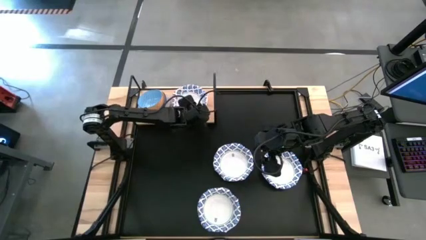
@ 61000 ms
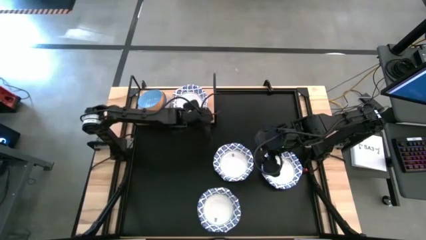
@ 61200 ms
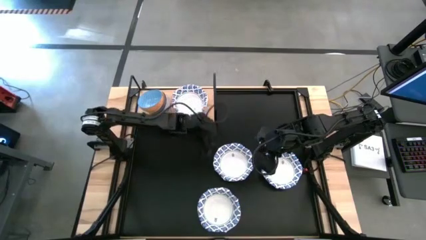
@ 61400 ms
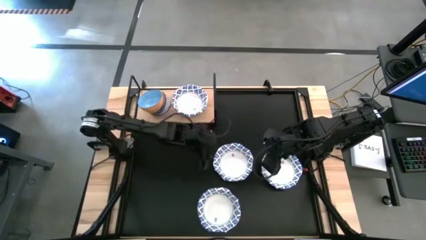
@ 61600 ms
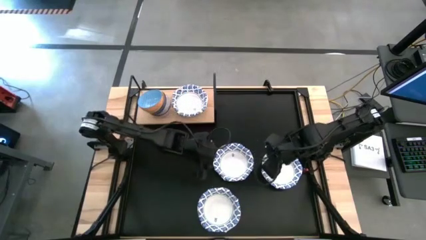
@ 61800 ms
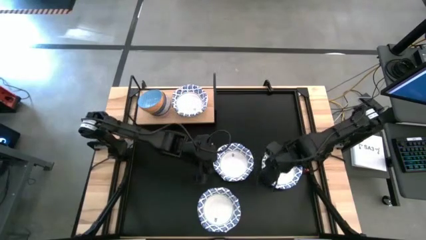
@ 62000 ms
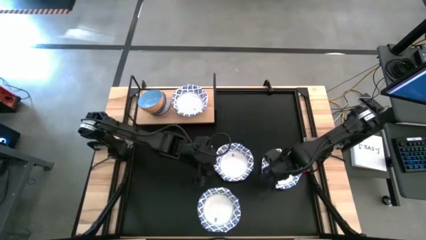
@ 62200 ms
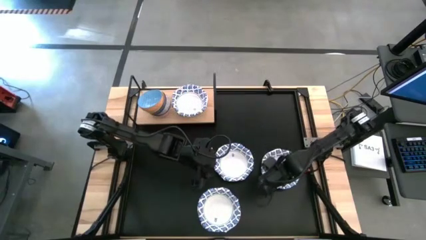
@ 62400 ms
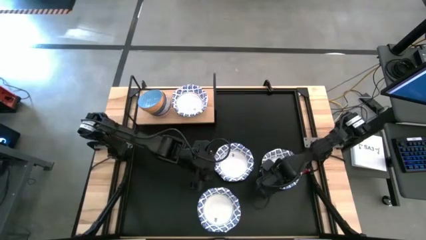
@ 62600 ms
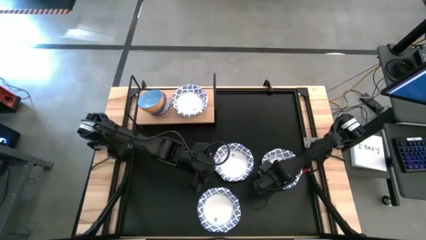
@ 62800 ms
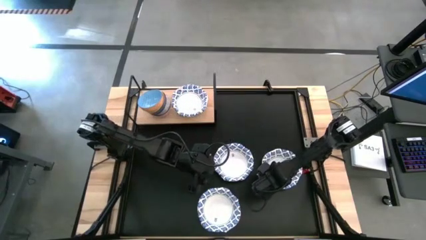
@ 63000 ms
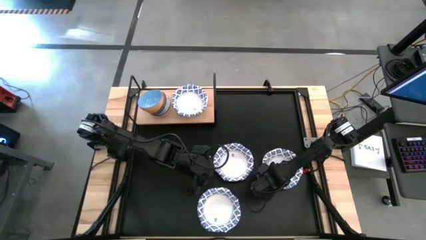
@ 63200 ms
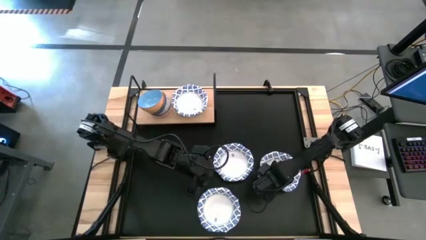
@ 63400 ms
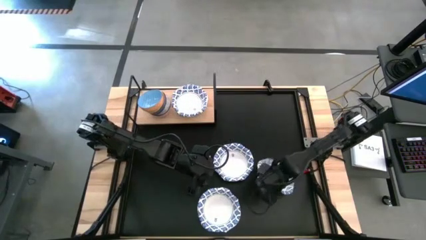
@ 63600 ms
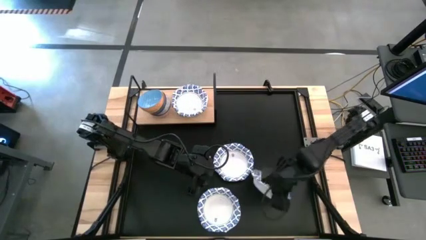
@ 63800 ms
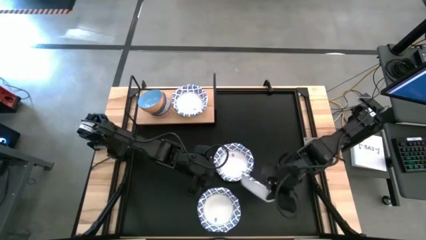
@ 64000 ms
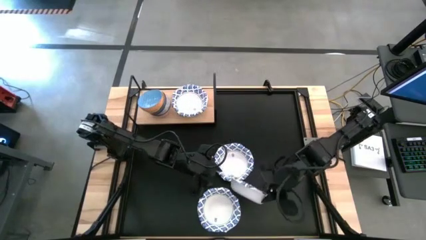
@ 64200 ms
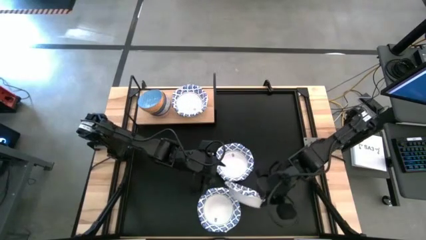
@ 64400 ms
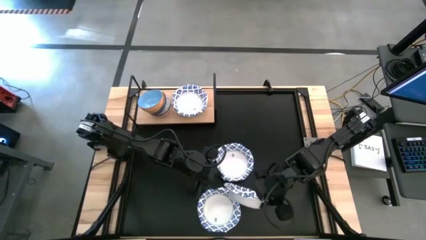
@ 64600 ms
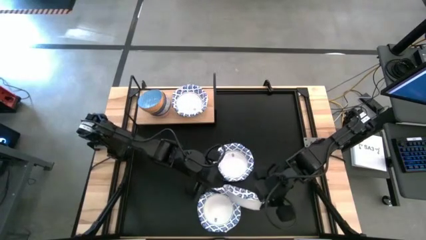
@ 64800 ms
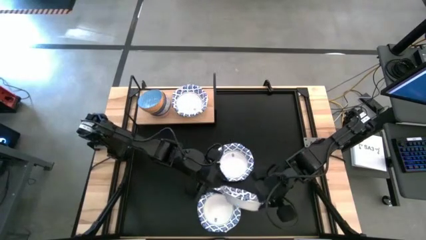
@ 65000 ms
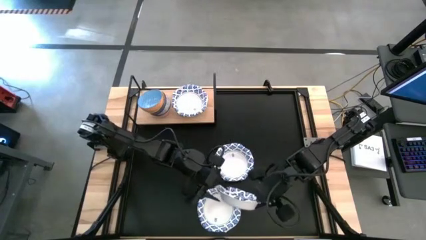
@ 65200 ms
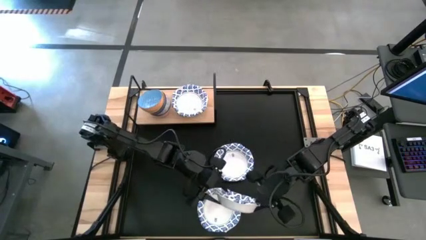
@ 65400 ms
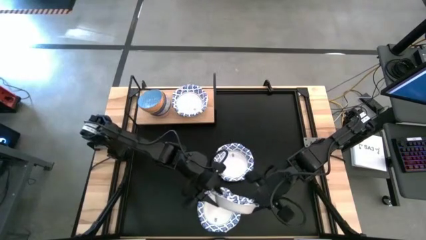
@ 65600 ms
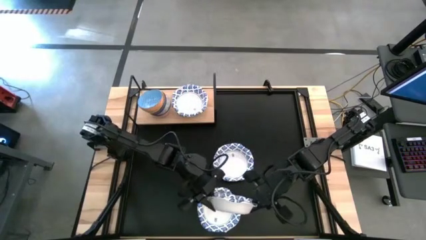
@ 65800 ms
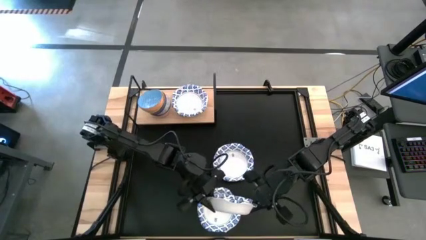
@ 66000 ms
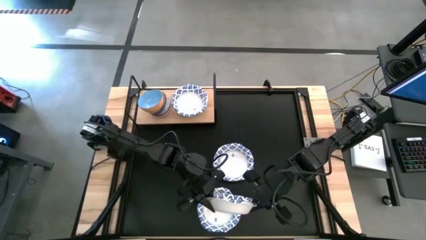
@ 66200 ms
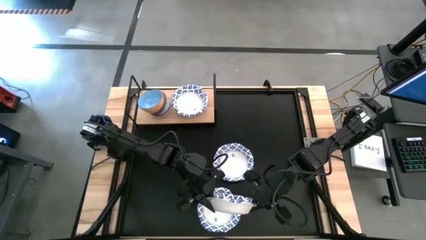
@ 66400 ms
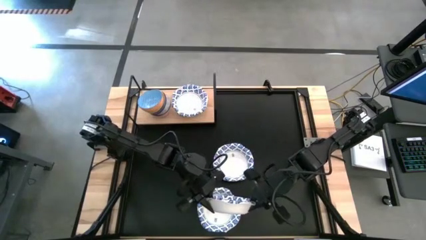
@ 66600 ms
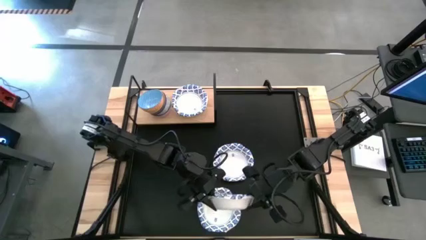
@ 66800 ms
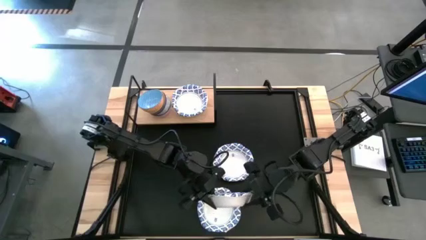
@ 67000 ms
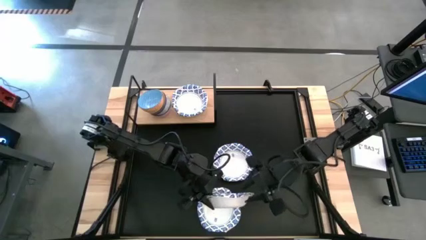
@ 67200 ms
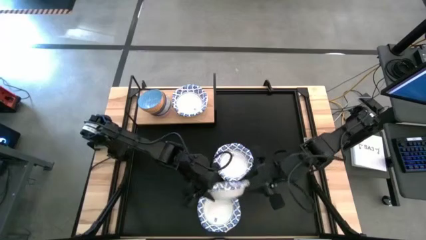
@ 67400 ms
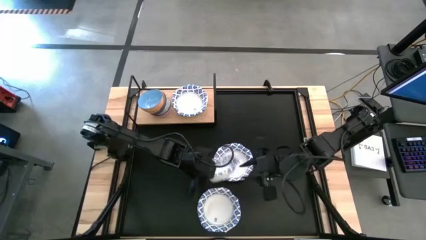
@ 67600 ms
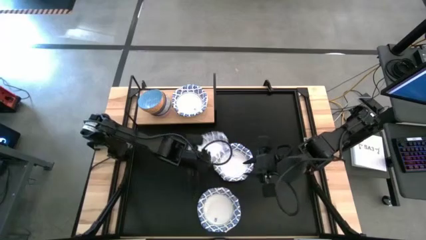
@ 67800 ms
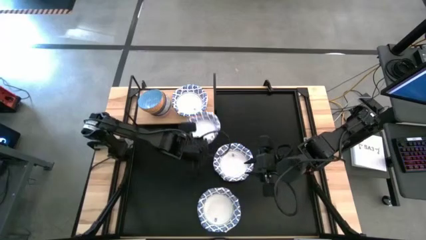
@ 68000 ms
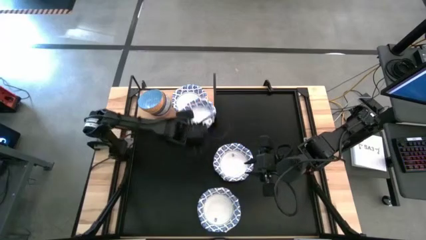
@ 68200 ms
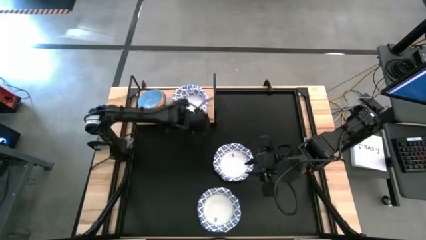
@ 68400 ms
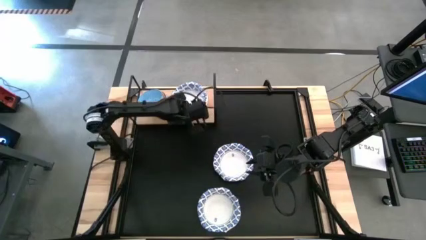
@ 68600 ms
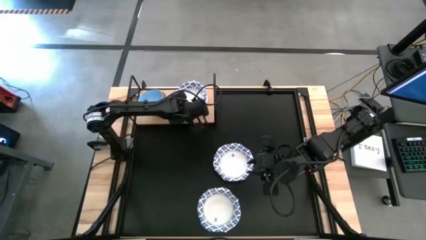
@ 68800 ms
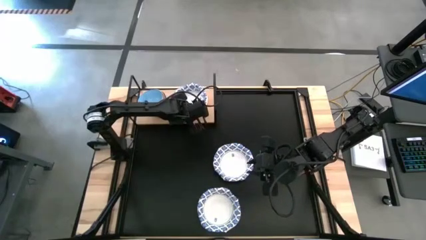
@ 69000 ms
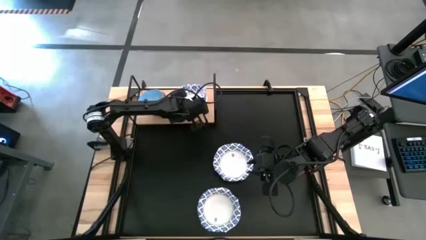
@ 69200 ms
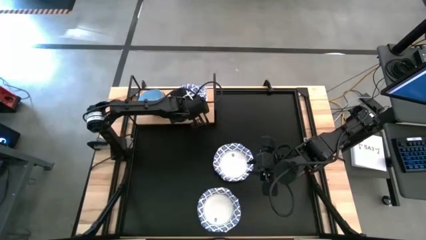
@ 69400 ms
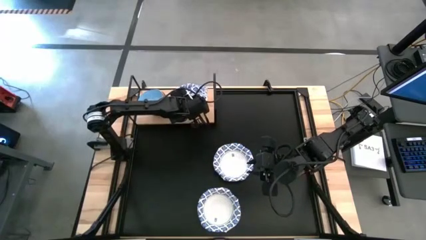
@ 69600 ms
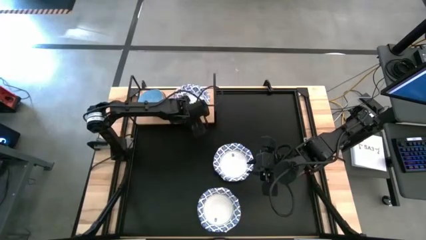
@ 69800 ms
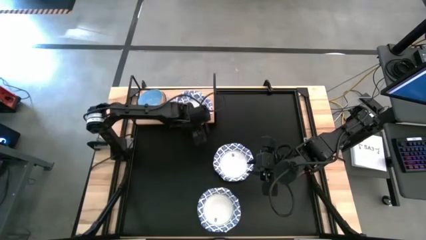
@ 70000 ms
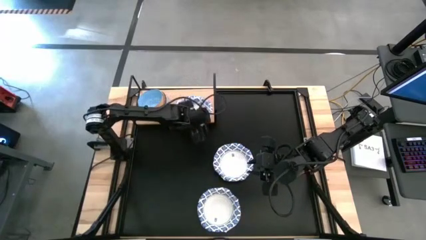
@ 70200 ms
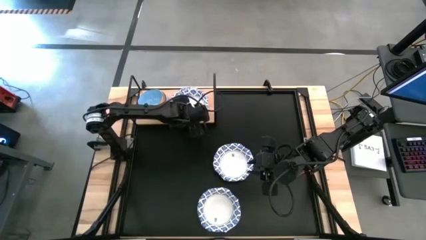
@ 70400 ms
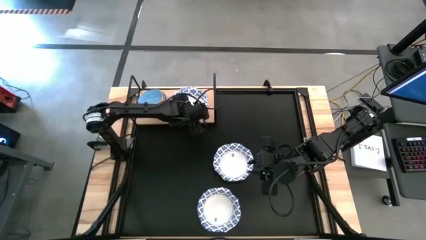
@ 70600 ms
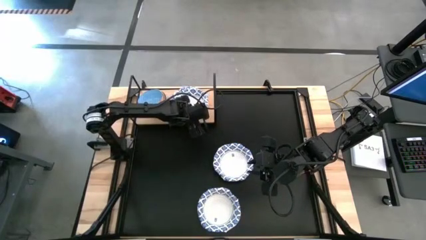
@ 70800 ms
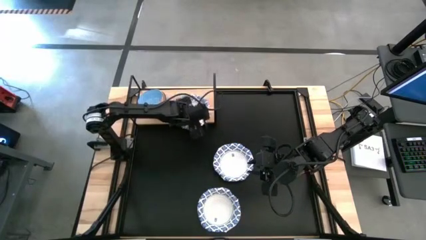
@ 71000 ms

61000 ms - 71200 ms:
Task: Place and stack bowls onto a shelf
Stack the top right white bowl on top of the other white bowl on the shelf

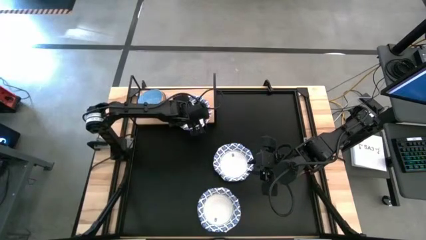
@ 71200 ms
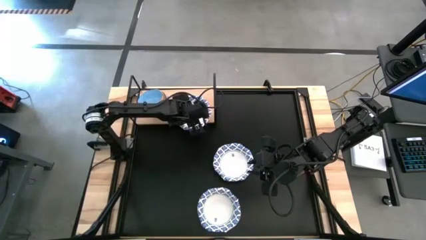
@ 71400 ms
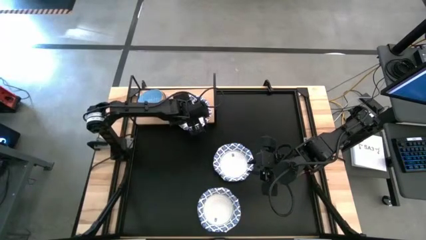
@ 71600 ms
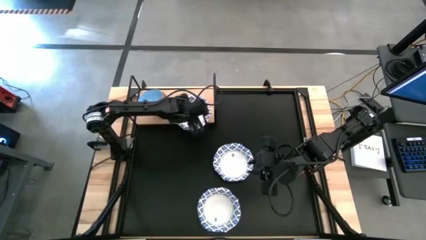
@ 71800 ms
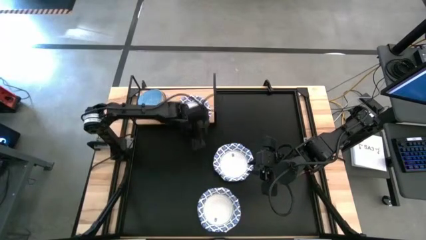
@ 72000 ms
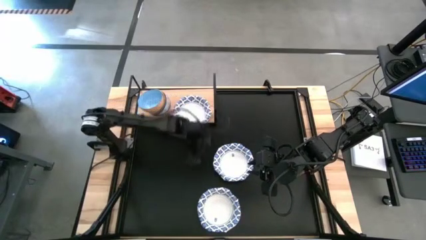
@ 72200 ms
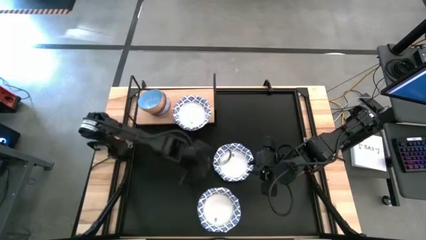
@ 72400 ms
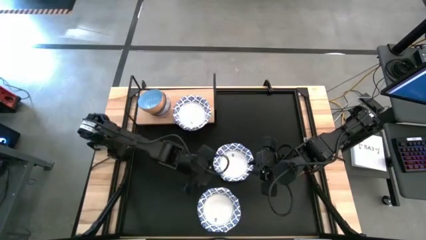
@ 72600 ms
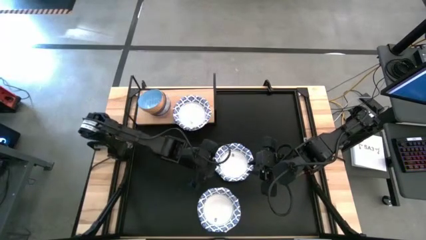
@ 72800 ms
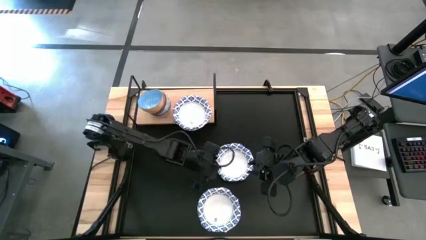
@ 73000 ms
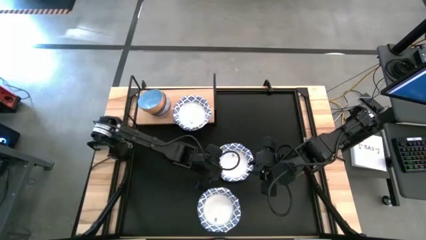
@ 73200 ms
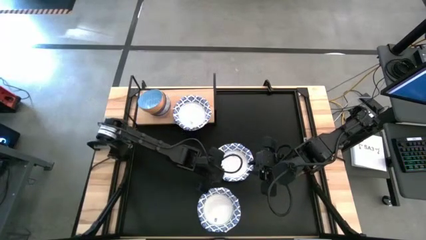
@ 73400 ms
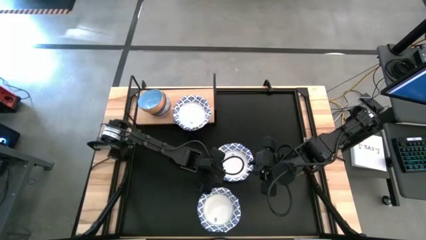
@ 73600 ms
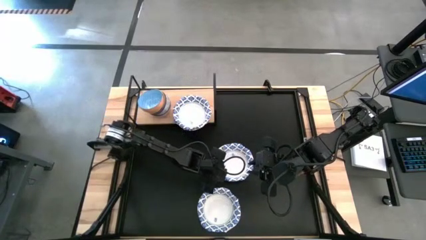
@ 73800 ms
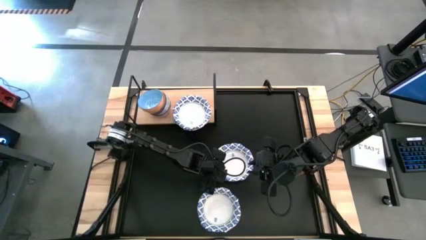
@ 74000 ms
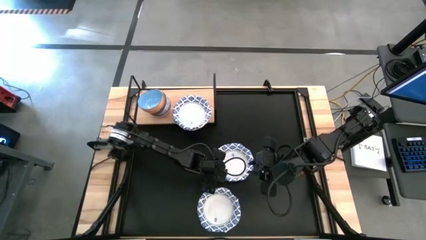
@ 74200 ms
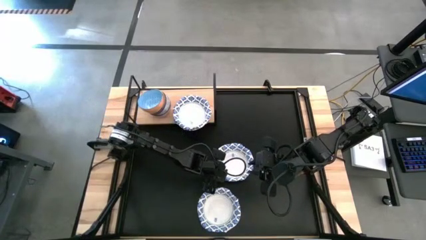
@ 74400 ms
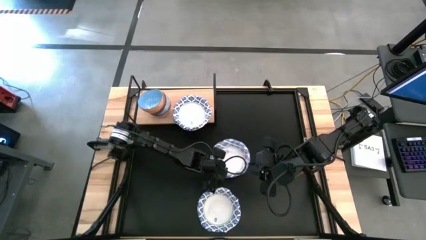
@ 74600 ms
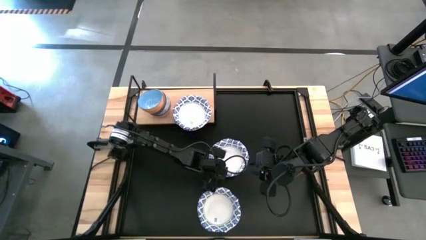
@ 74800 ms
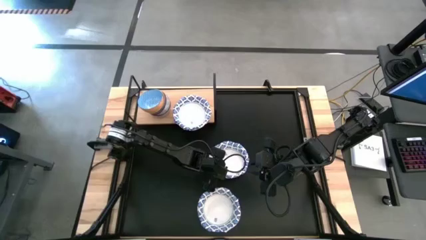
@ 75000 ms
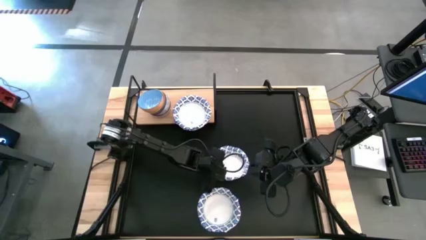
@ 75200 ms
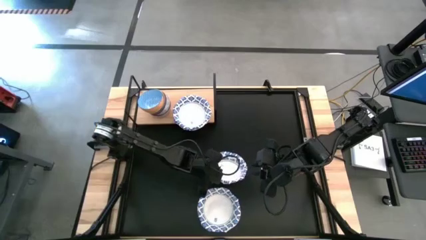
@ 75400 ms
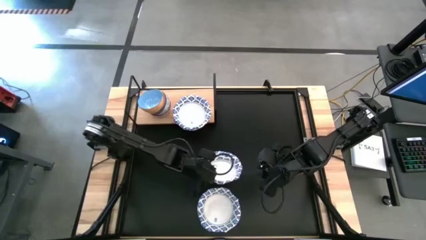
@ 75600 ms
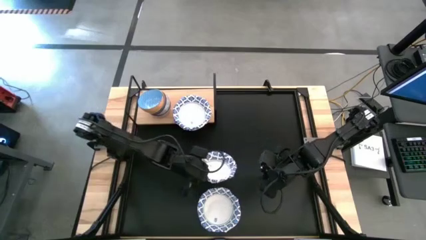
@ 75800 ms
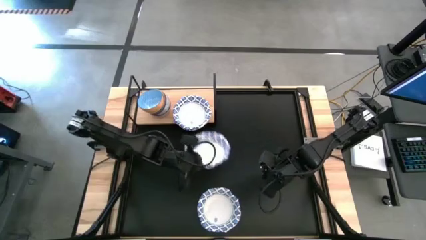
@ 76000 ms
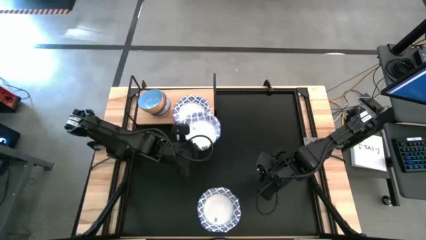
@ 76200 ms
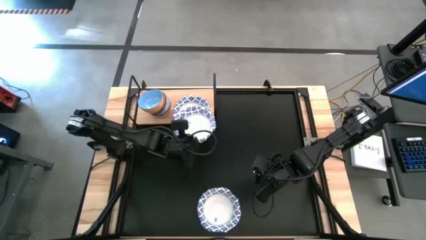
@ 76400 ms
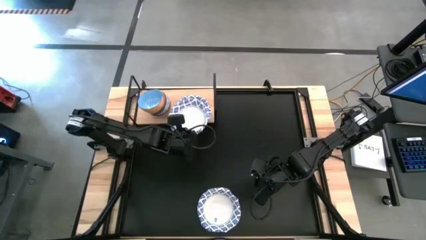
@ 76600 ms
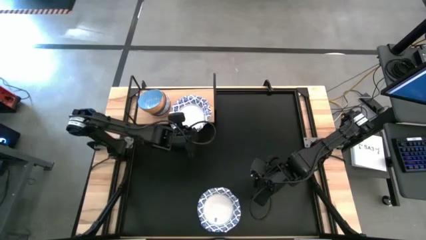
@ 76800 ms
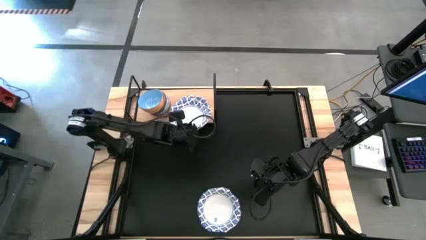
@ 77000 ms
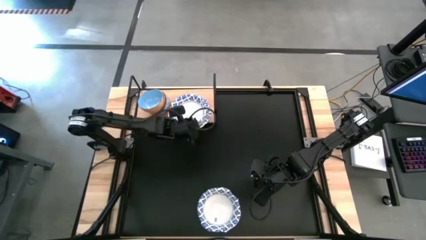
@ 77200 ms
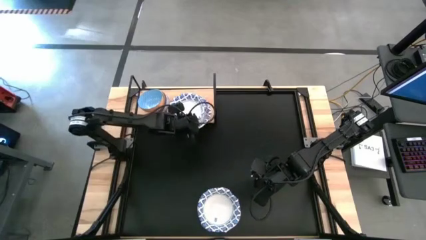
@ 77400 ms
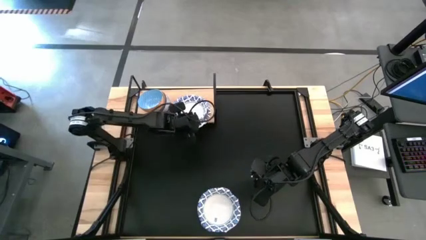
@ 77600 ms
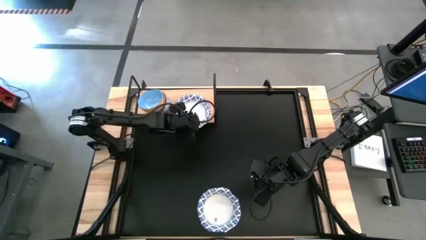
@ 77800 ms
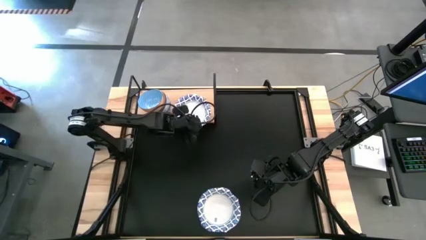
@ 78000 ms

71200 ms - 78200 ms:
Stack the top white bowl on top of the other white bowl on the shelf

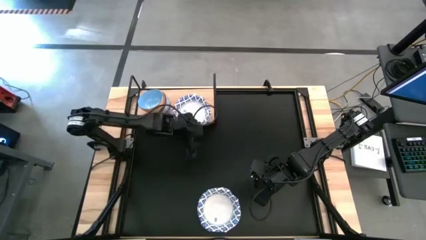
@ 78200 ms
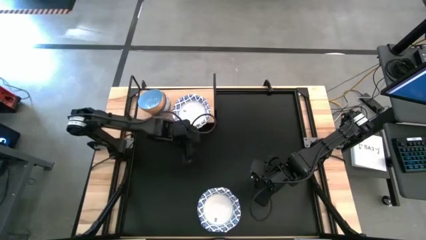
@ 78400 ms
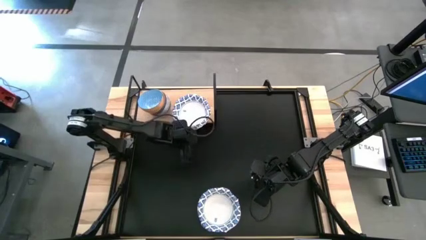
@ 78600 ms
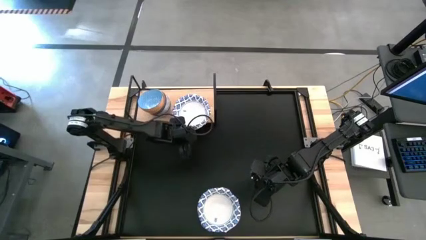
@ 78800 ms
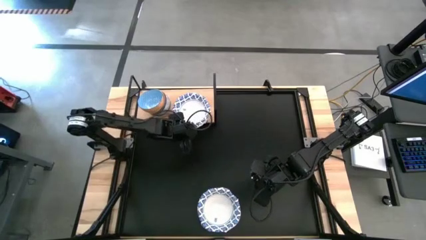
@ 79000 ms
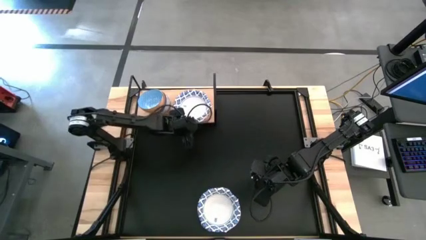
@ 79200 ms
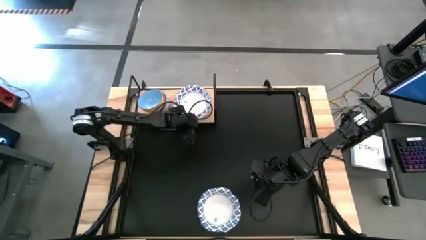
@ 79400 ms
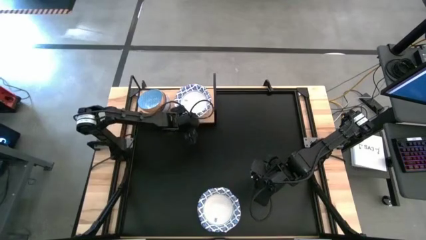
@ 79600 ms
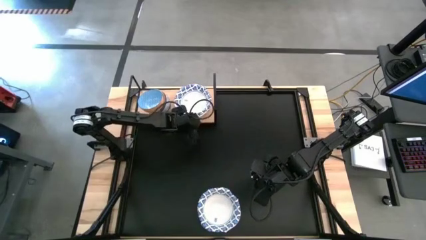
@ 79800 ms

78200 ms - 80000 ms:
Adjust the stack of white bowls on the shelf
